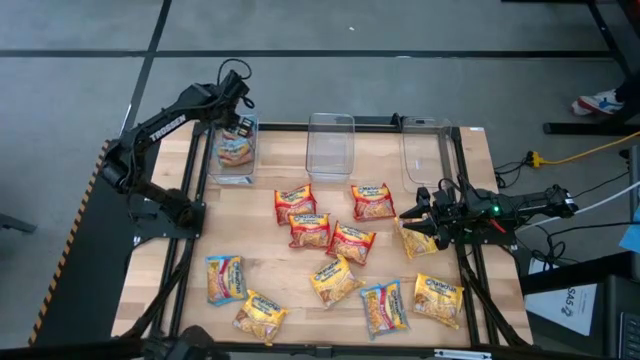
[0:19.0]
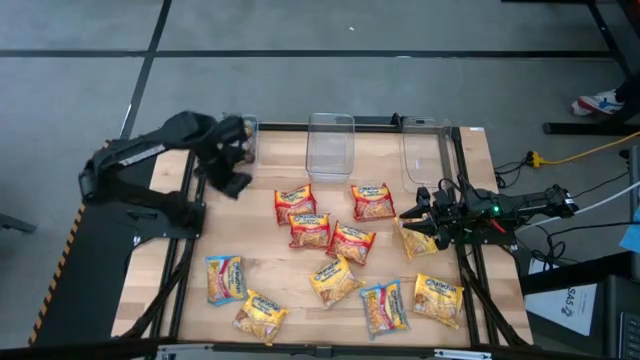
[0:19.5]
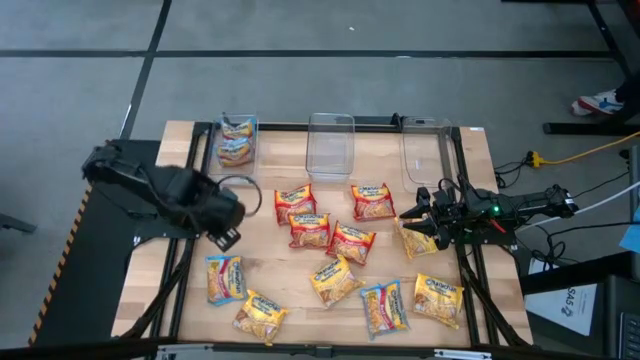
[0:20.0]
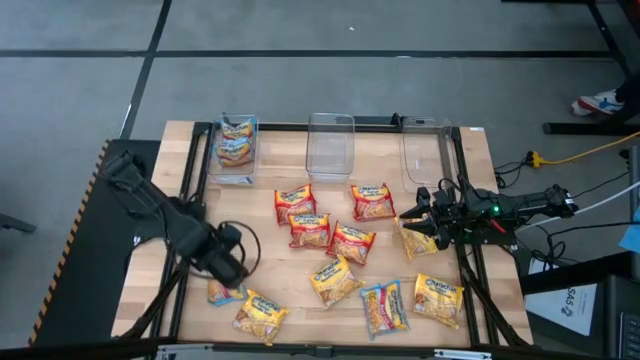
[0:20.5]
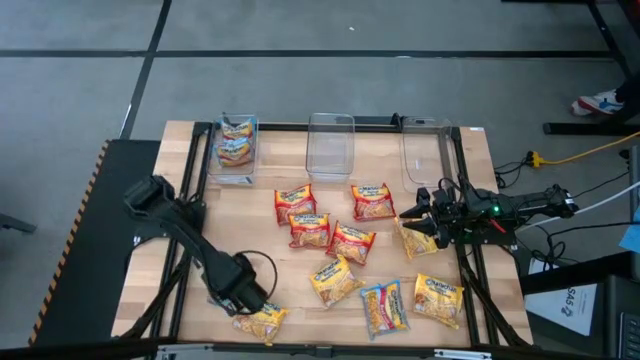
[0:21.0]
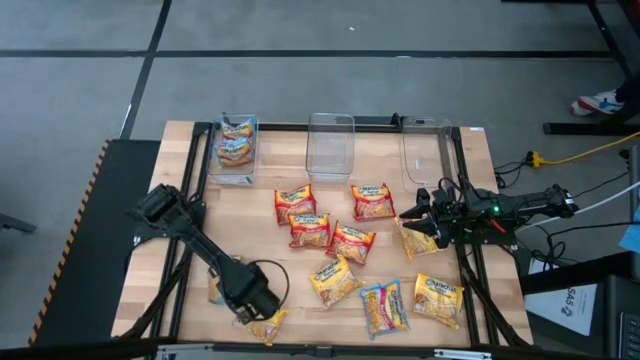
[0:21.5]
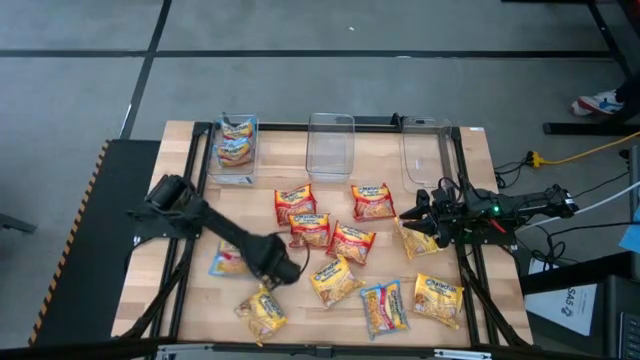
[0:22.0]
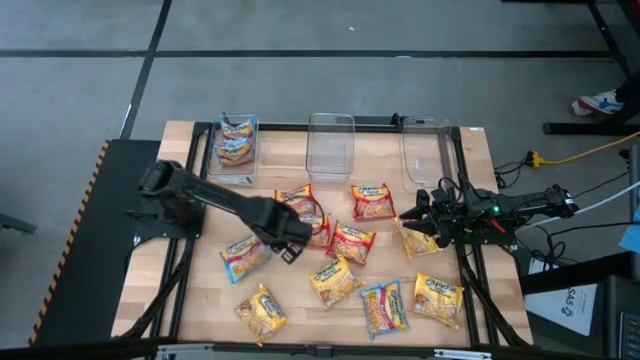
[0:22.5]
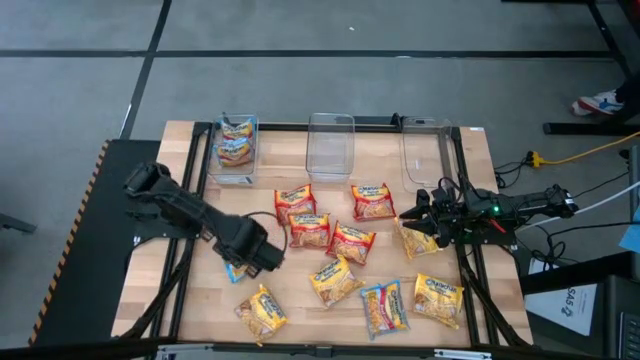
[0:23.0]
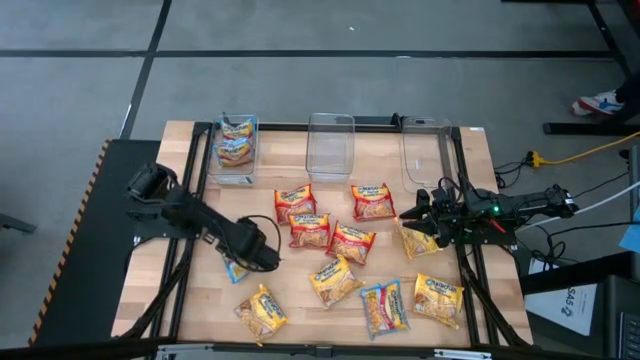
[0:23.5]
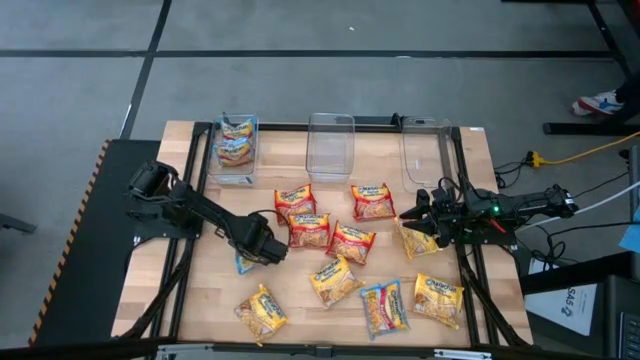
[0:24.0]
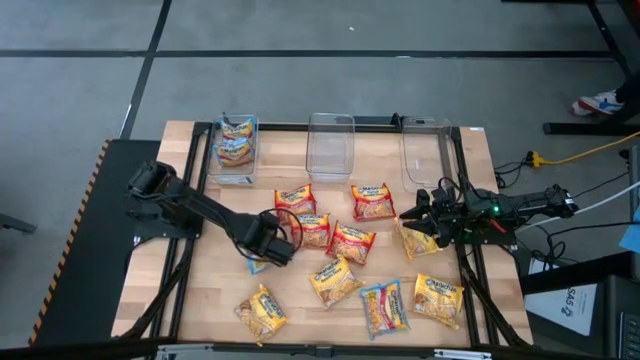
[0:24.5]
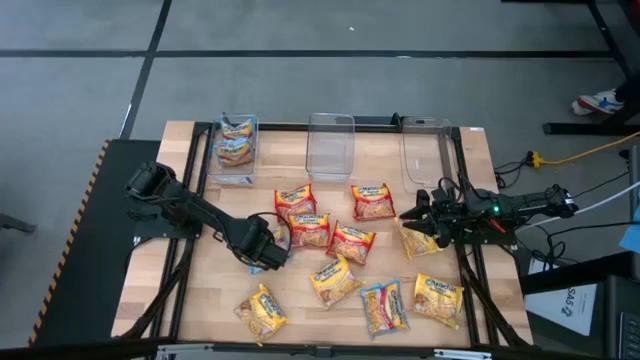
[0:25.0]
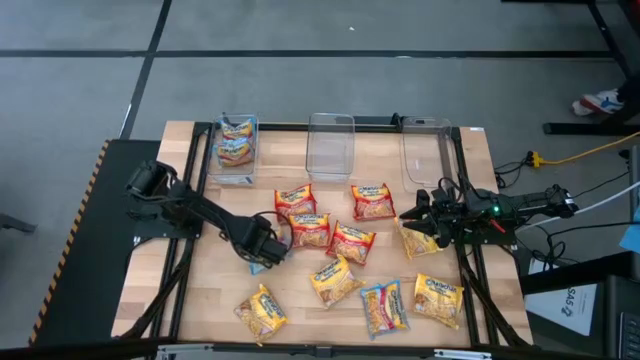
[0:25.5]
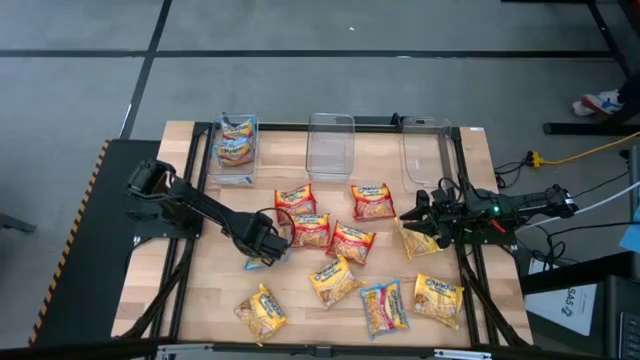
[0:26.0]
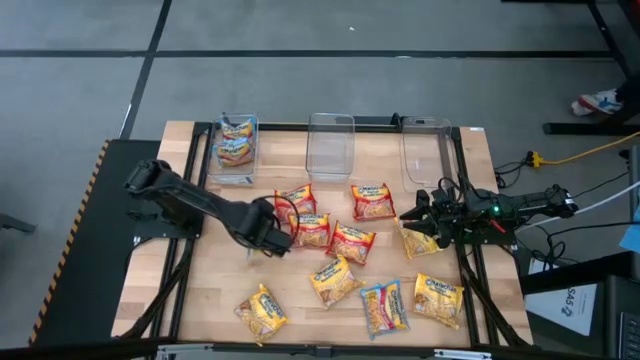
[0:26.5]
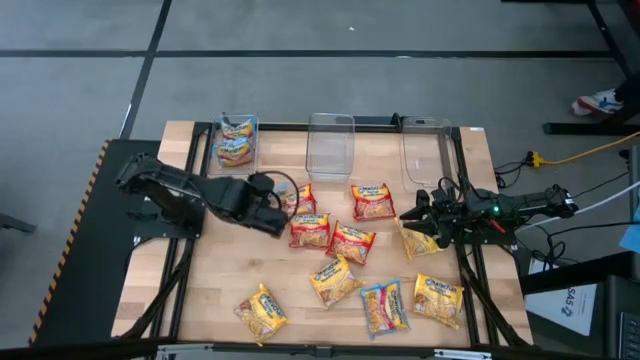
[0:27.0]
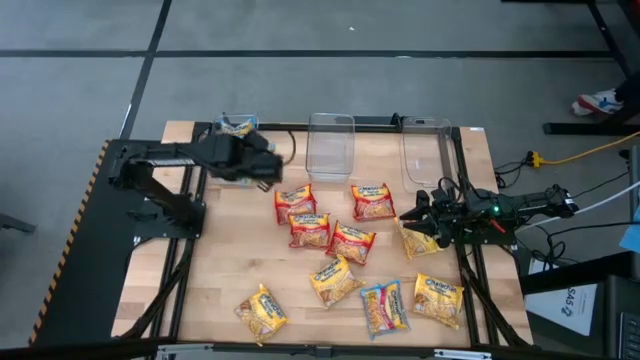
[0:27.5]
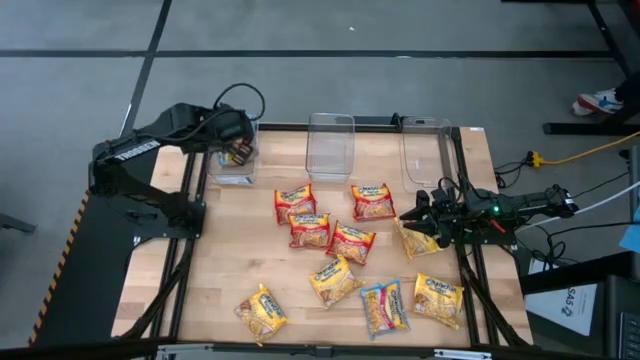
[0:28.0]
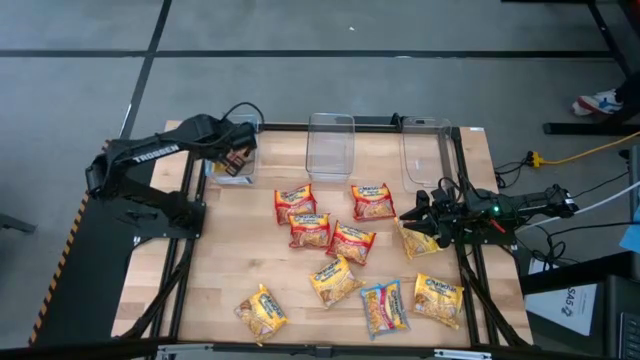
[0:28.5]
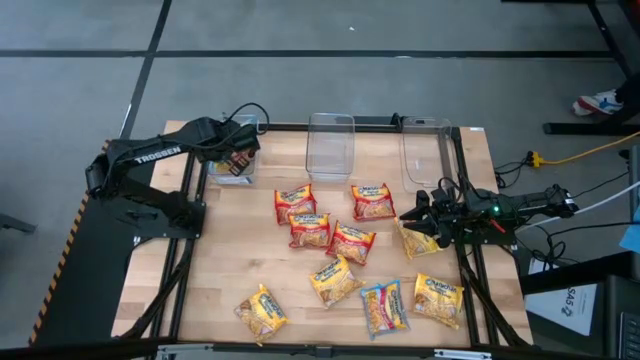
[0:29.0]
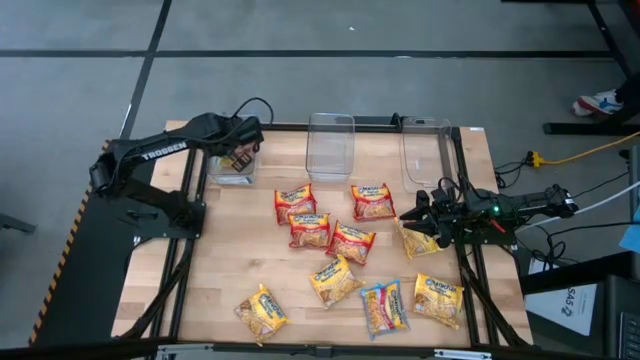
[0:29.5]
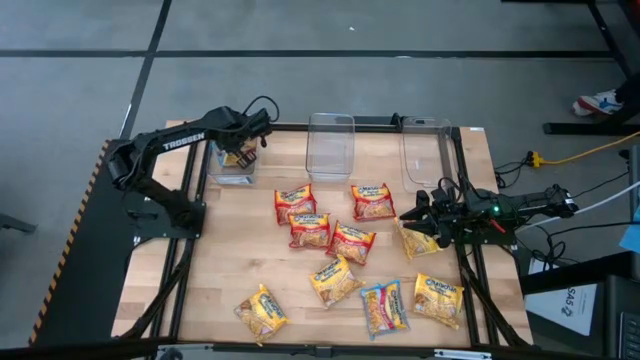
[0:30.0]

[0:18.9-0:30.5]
Task: Sort Maruchan noodles
Put the blue noodle pack in the left transparent basket

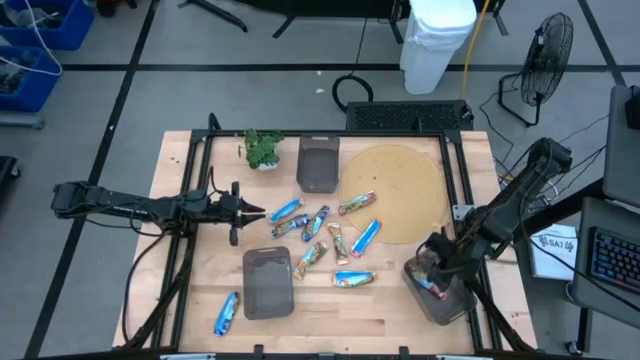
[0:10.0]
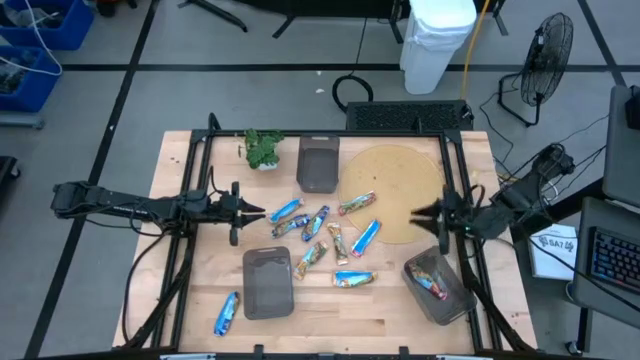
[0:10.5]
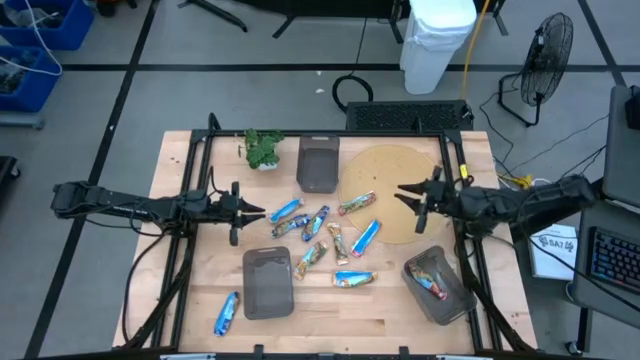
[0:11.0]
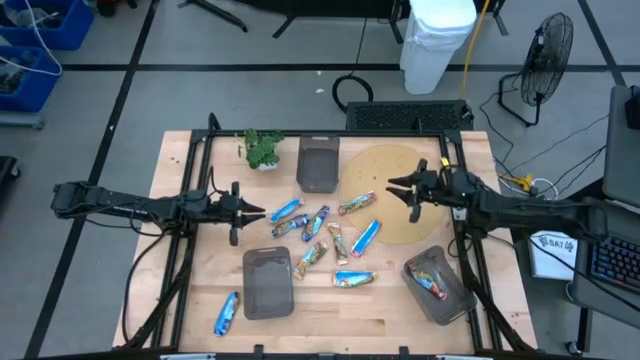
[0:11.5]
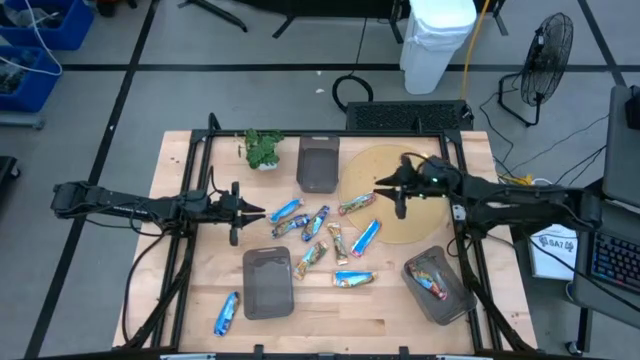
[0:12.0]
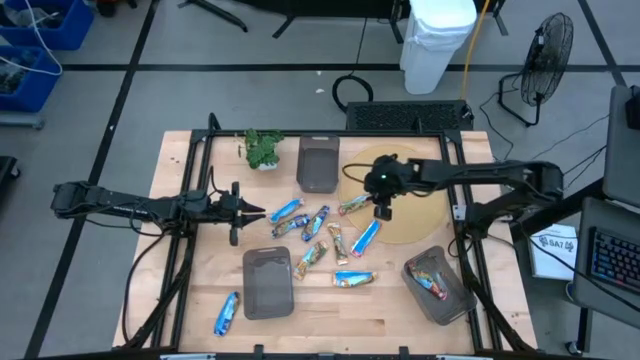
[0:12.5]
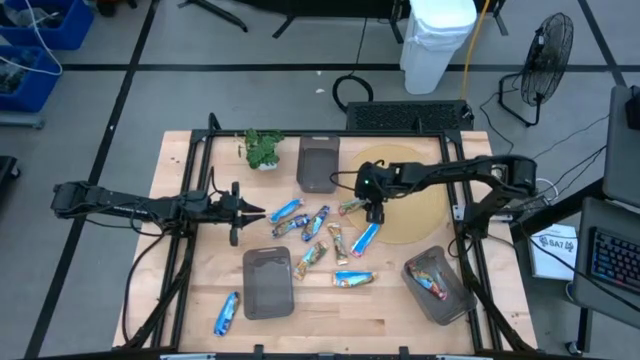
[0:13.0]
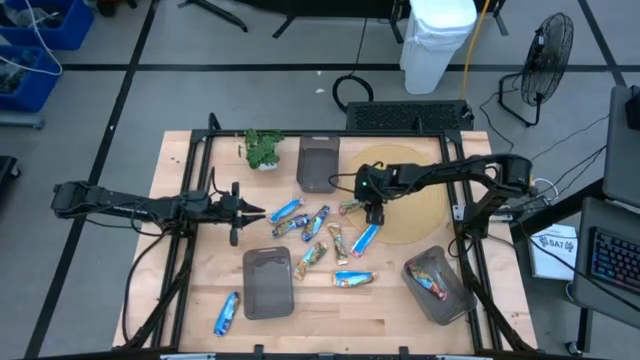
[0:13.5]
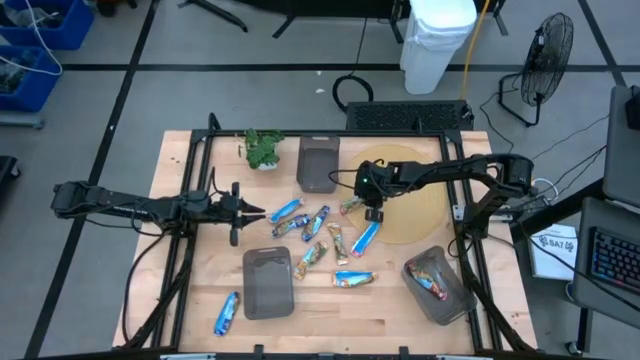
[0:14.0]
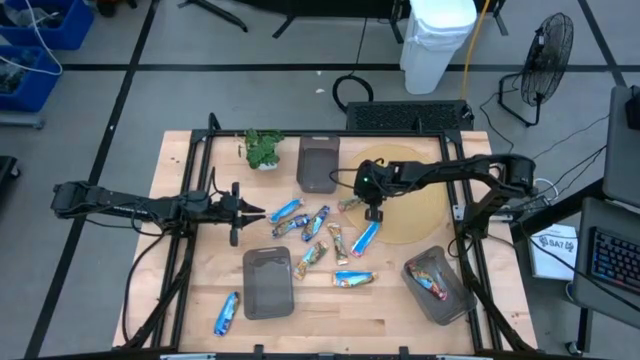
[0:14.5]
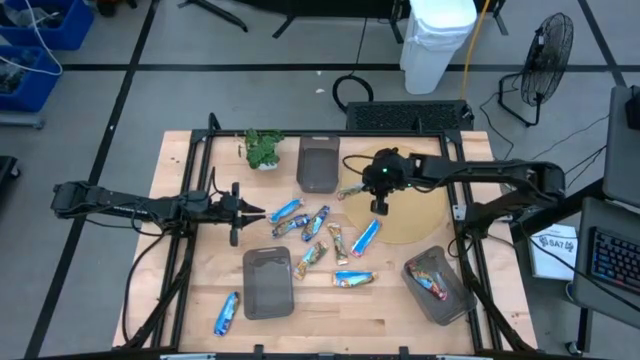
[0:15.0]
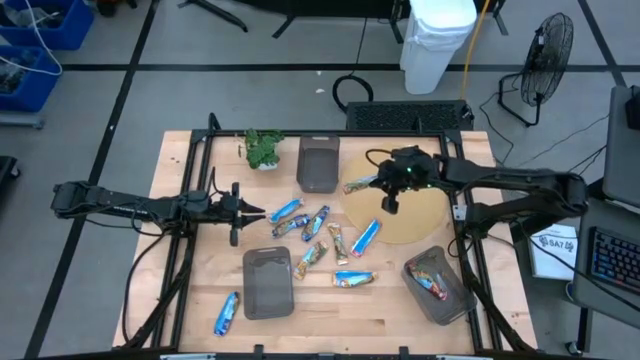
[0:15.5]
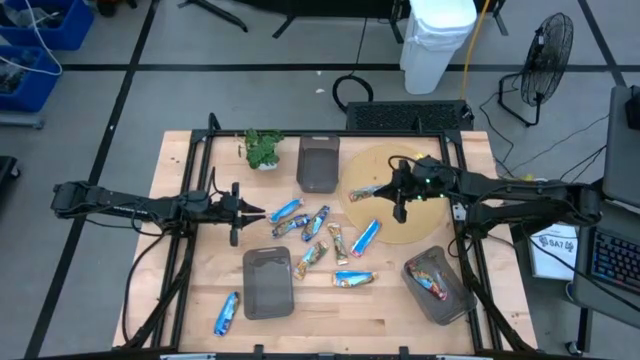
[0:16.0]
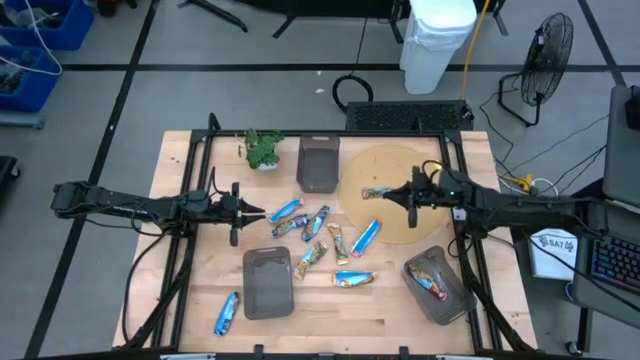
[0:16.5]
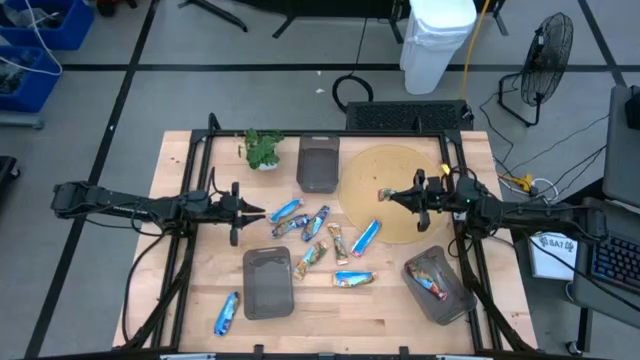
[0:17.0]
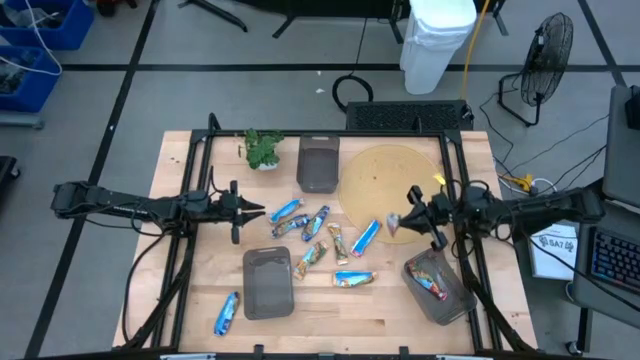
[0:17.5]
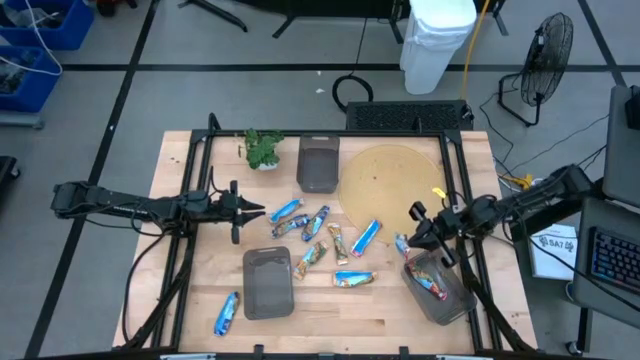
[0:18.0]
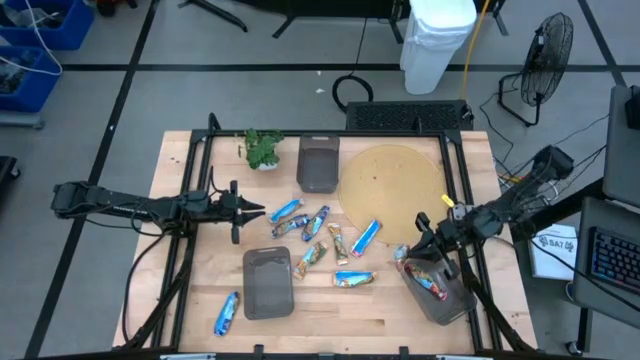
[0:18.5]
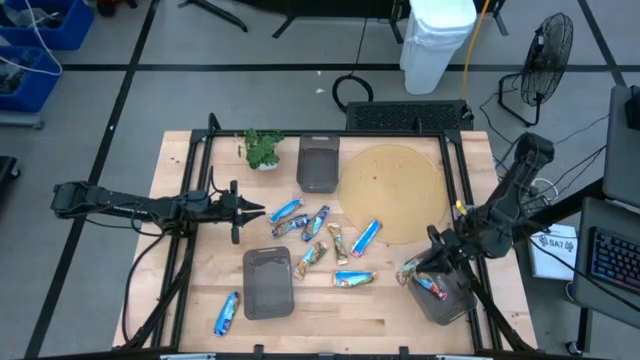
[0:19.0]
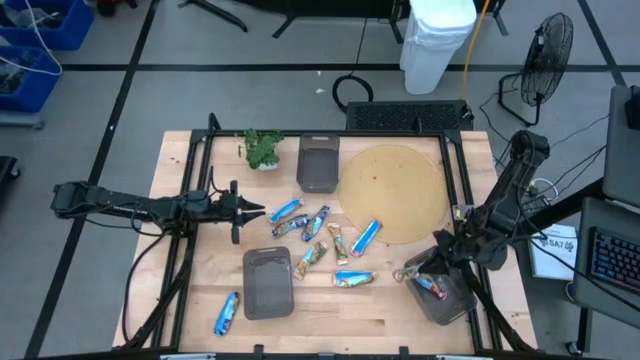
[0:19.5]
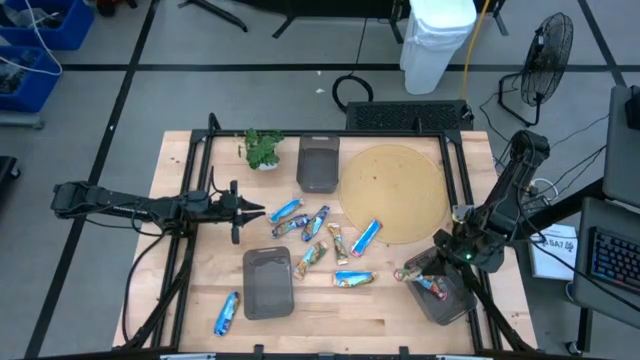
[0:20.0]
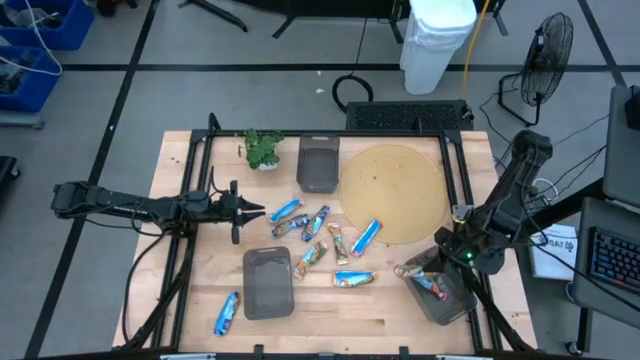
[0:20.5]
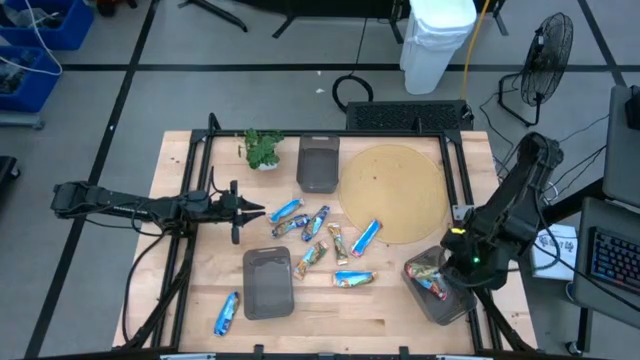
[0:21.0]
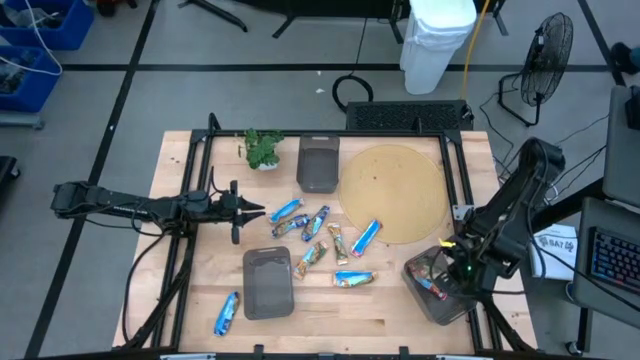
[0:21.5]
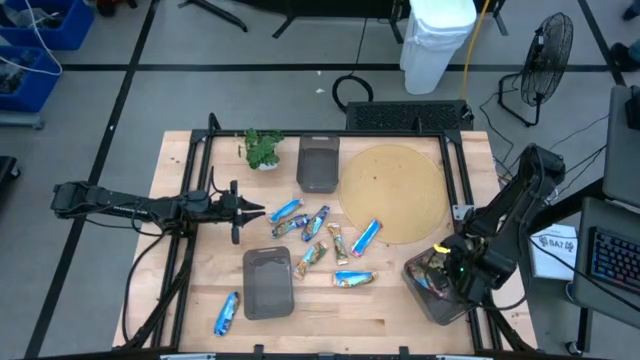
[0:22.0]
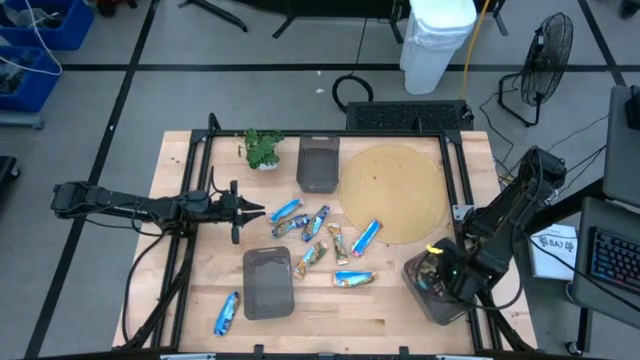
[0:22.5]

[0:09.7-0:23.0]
Task: Pick and place Granola Bars by type
Put the red granola bar into the bottom right black bin
